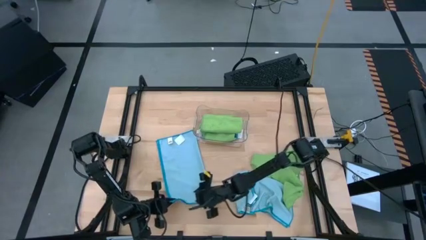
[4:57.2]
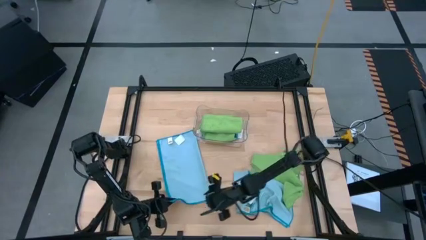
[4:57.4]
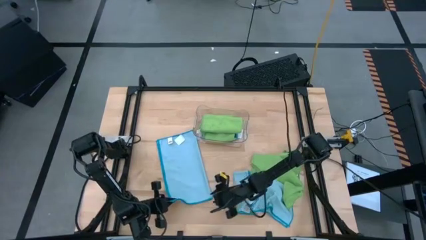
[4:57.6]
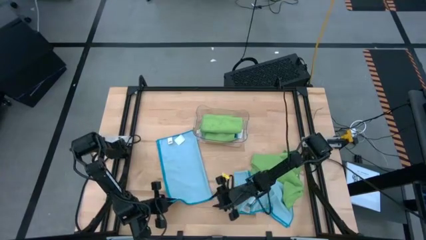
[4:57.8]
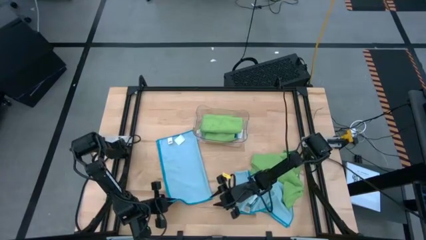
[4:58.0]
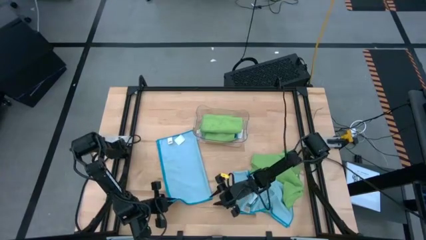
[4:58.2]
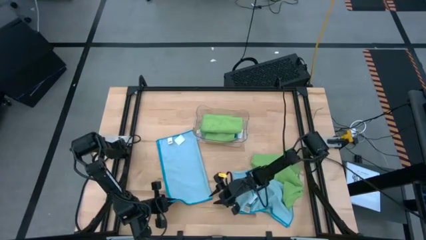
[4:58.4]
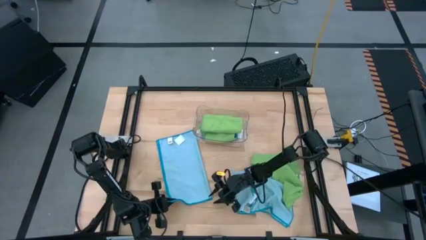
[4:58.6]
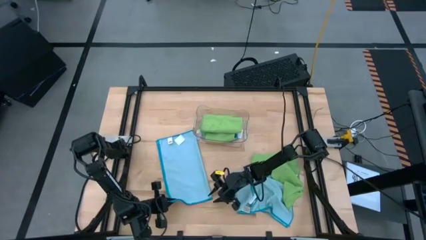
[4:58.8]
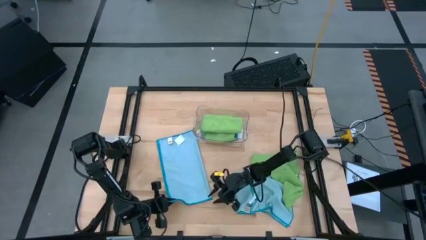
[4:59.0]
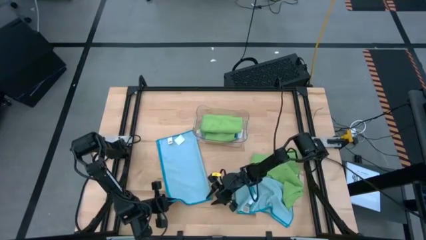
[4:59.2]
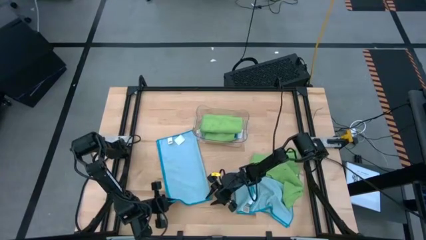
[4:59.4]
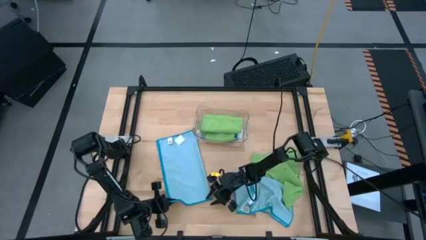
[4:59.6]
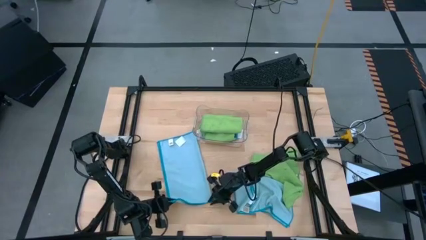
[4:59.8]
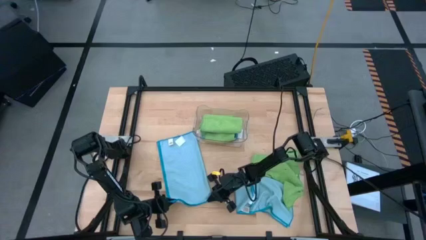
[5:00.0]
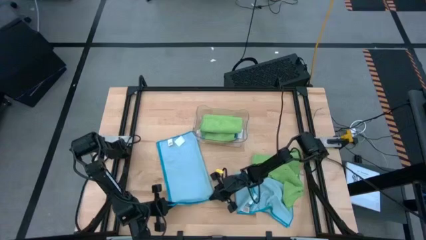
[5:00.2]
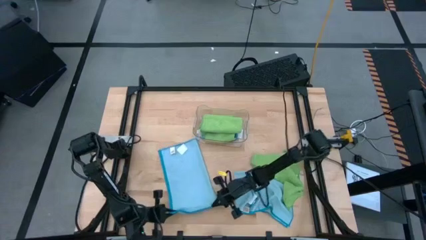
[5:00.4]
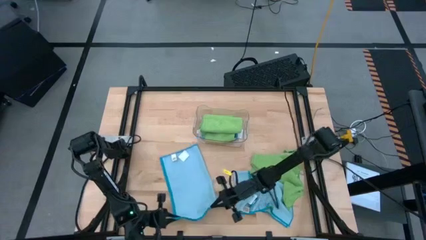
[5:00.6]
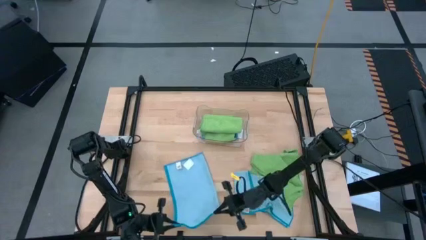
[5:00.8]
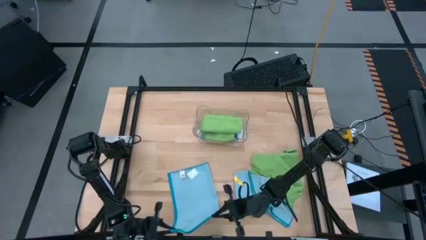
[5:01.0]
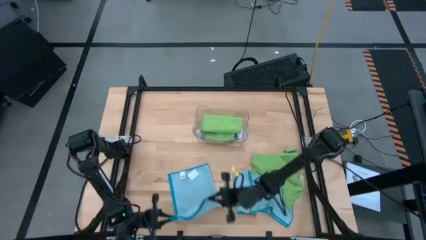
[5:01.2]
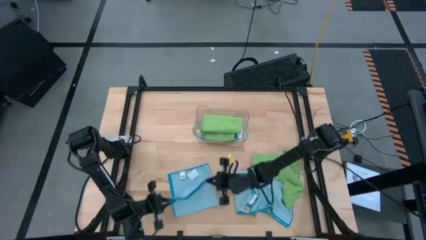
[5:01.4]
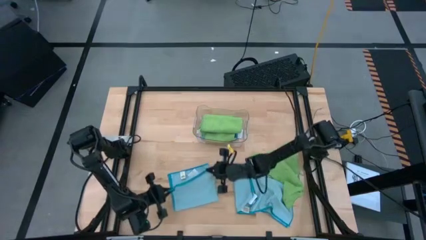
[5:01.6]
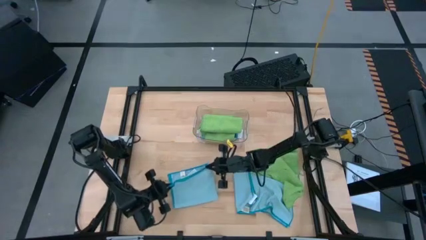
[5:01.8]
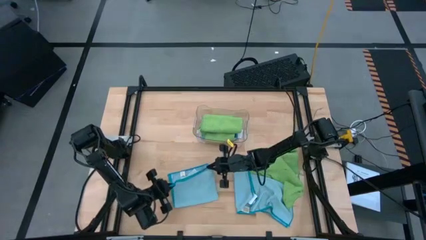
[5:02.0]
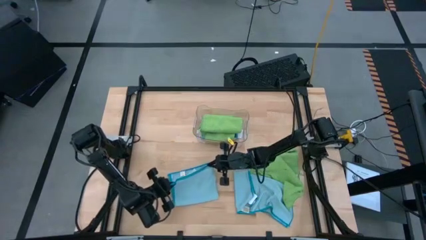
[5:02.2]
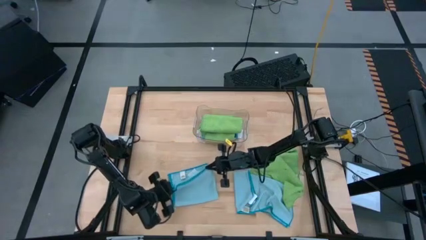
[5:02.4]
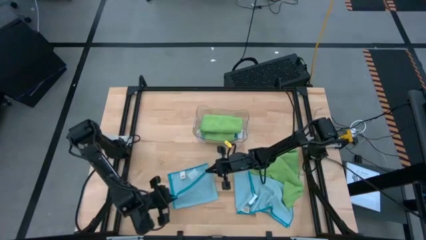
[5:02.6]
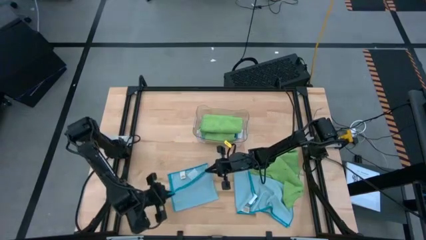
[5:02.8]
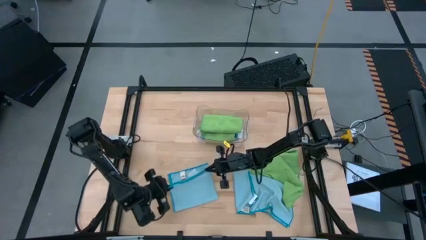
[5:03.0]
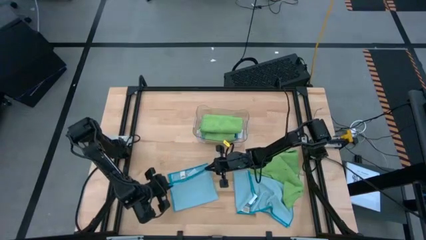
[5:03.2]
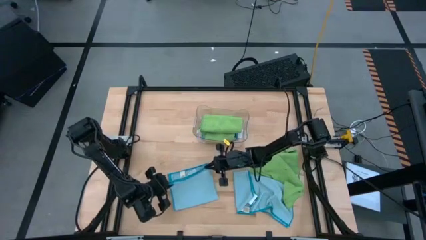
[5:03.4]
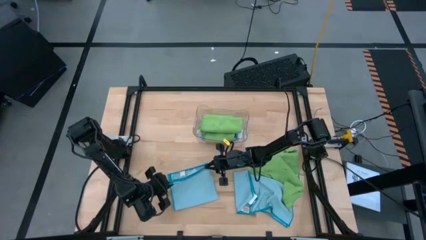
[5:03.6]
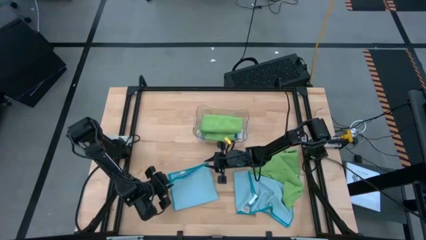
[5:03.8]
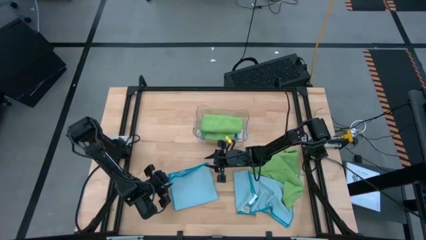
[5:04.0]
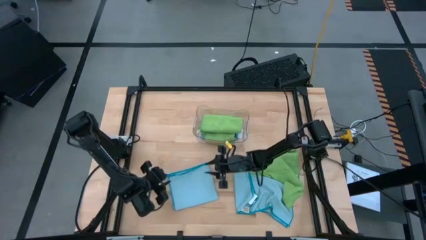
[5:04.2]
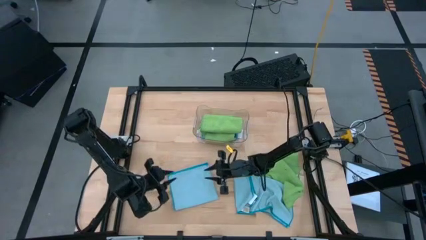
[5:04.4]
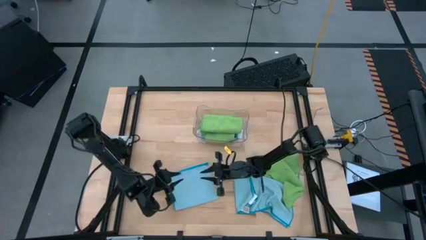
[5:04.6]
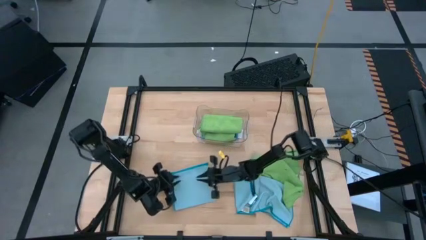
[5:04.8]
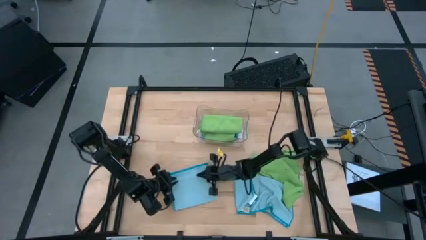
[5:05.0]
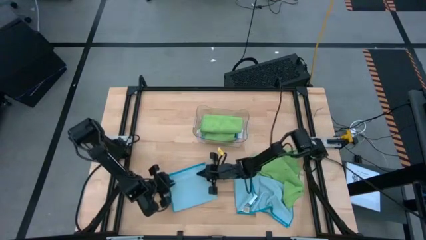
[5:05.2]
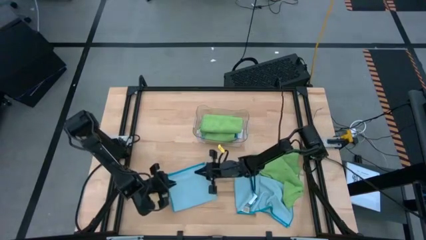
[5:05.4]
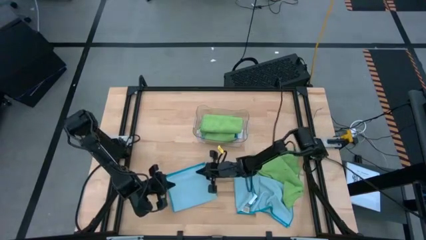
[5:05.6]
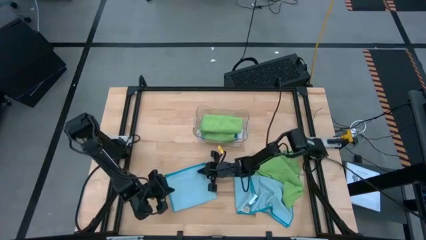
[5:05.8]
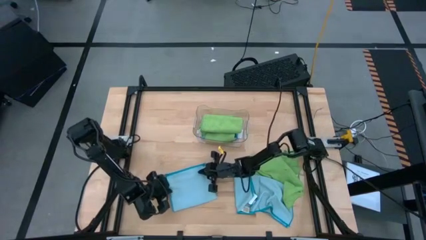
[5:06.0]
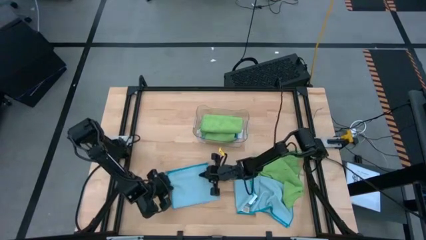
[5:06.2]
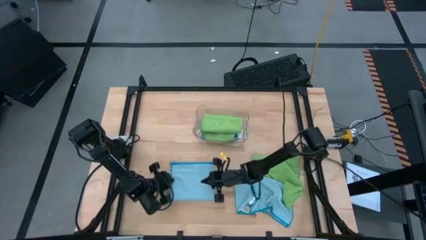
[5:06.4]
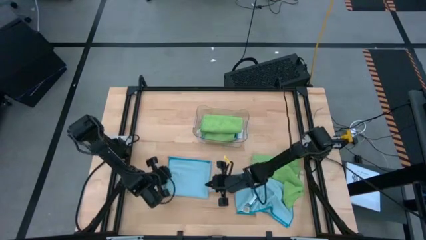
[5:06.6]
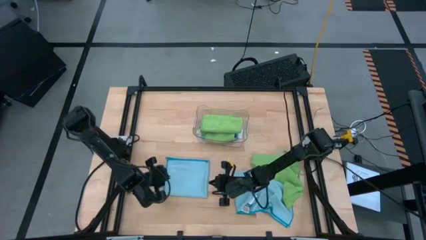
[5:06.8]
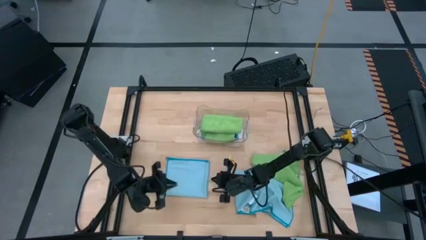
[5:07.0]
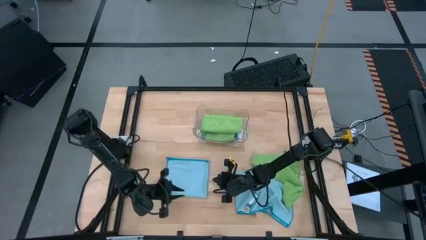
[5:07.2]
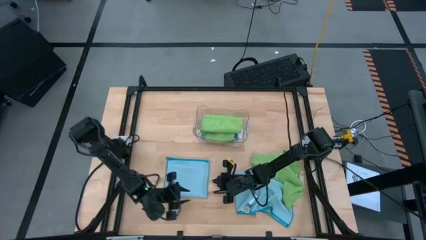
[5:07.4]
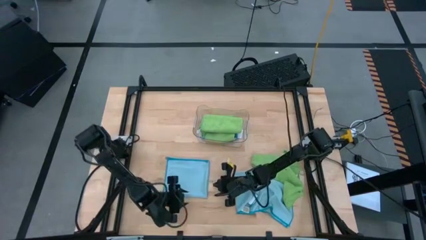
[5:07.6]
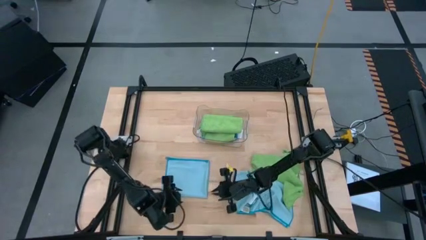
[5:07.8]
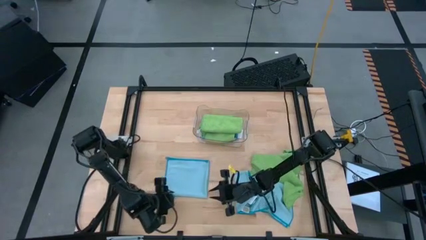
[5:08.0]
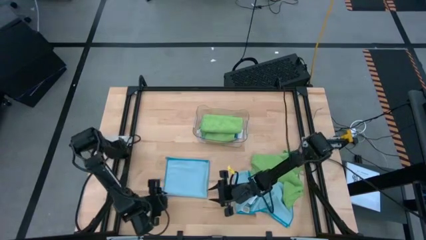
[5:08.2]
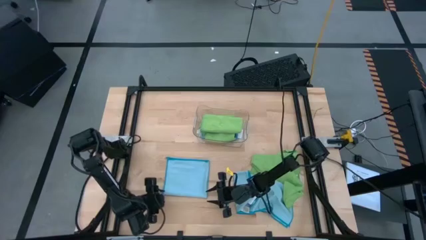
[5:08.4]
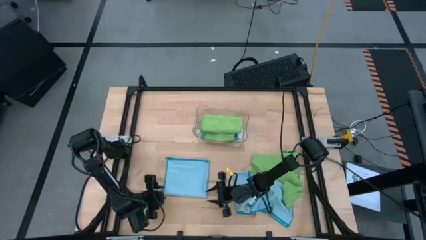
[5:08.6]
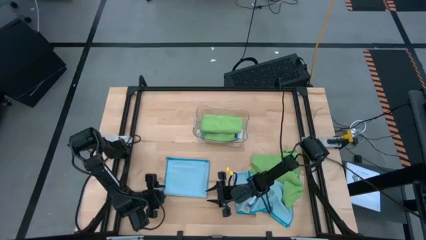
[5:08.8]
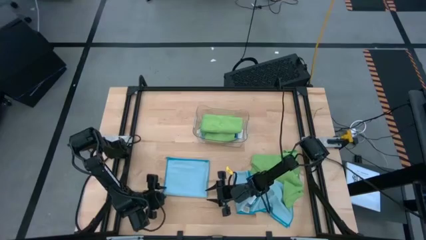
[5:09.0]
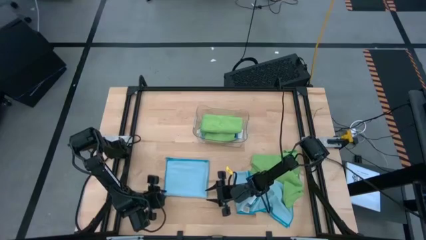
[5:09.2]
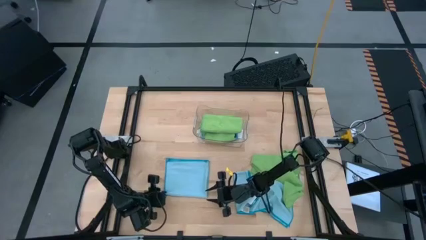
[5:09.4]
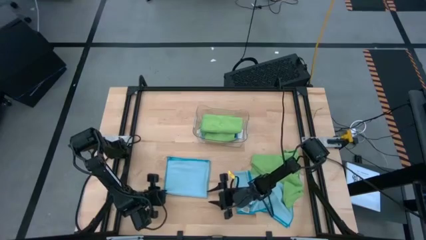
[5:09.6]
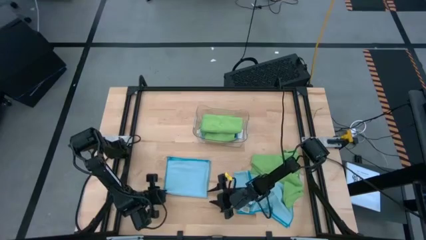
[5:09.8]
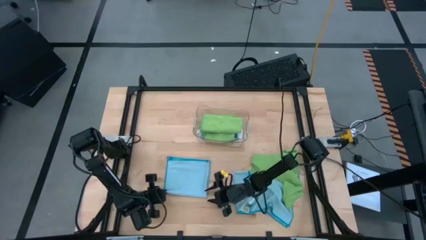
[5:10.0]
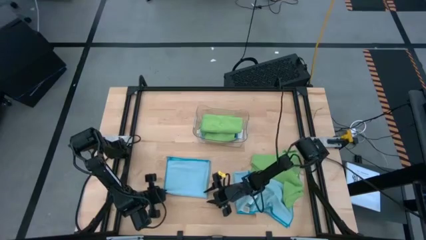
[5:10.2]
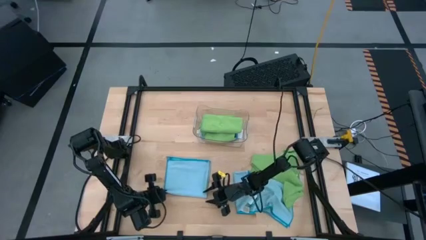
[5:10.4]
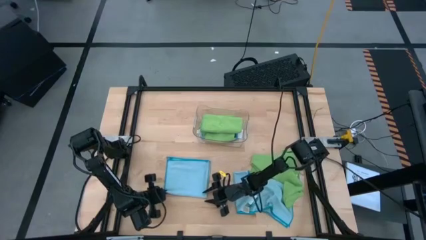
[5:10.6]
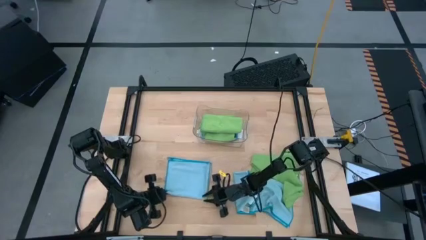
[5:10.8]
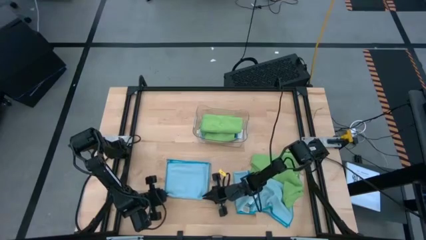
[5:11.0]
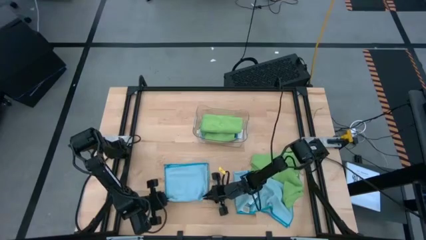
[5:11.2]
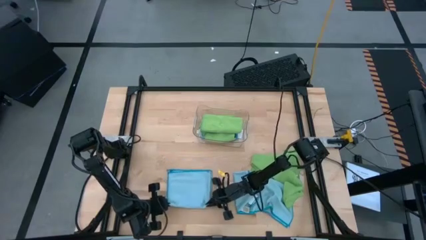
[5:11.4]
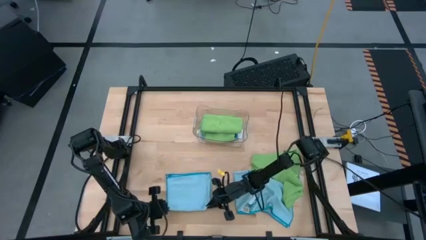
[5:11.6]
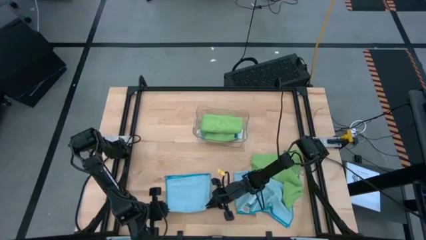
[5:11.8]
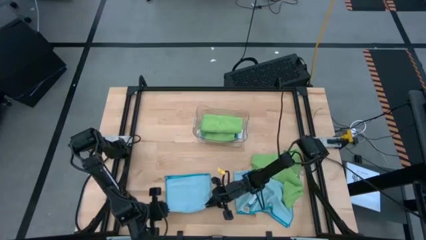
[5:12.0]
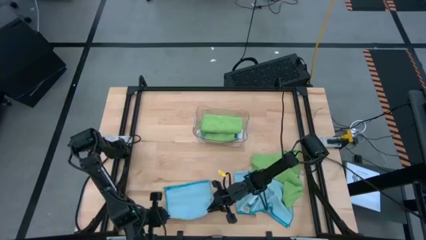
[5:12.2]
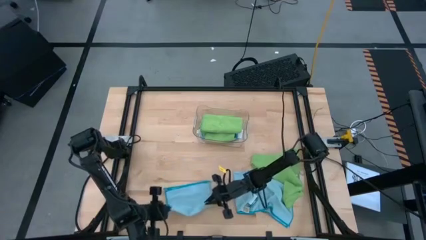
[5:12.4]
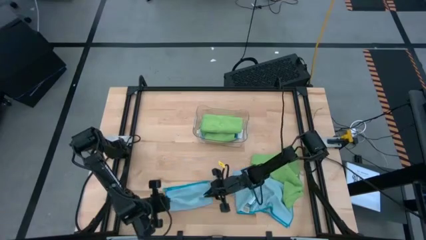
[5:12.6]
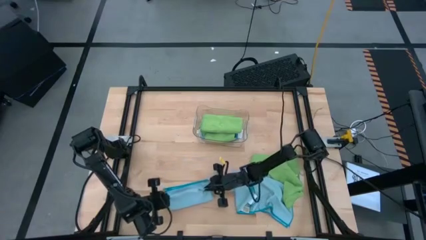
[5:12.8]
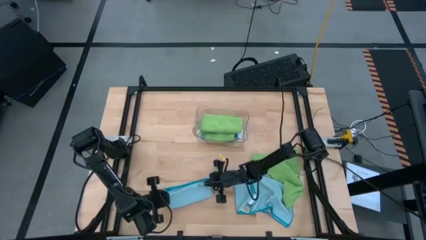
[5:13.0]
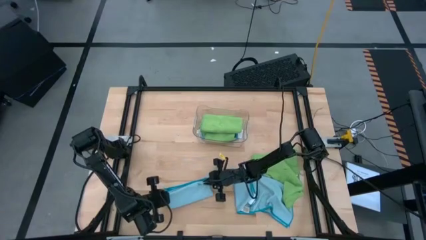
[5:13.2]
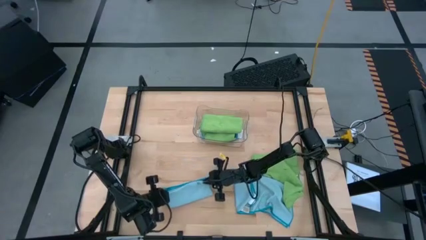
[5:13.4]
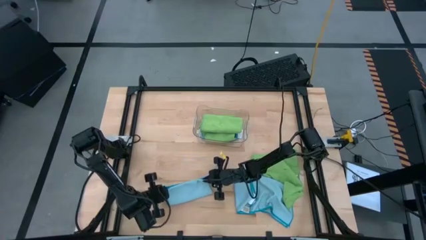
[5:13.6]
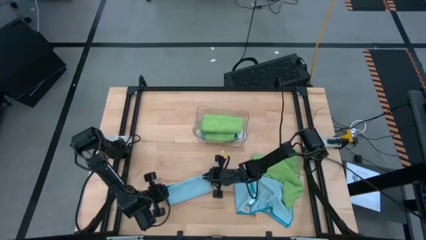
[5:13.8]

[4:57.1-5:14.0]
Task: Fold microfiber towels
Fold the blue left microfiber cloth
